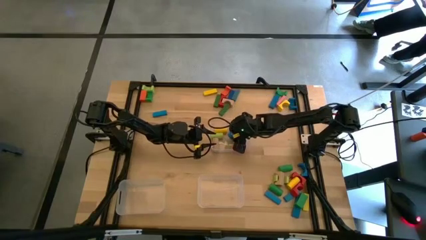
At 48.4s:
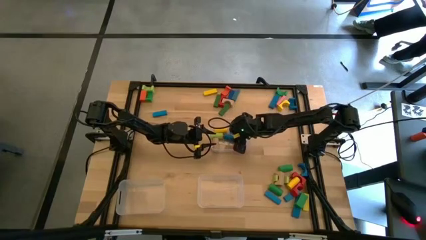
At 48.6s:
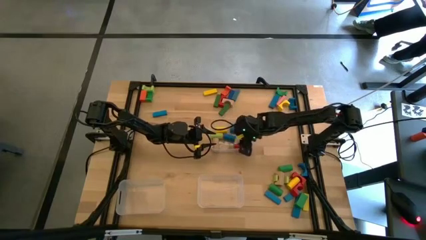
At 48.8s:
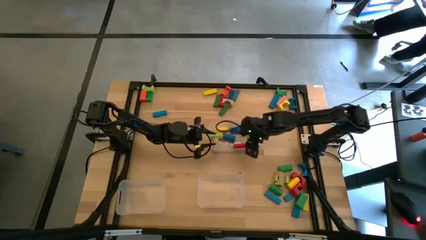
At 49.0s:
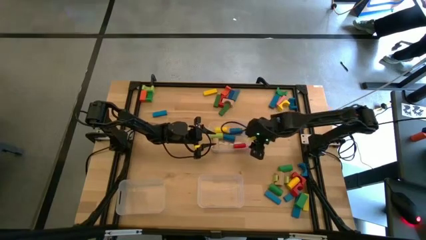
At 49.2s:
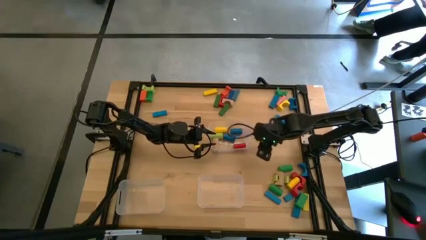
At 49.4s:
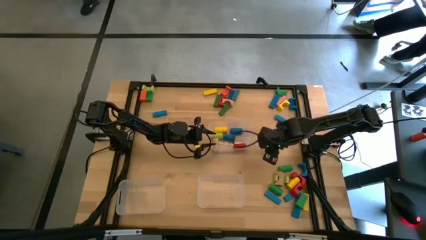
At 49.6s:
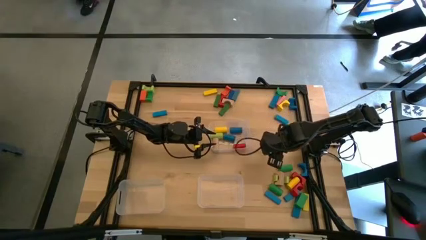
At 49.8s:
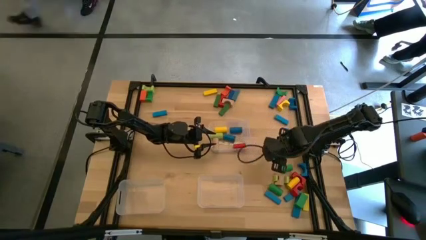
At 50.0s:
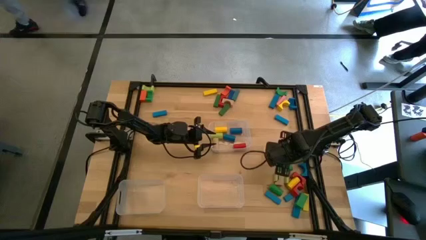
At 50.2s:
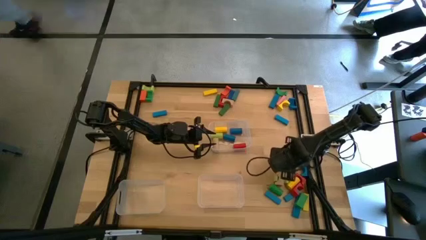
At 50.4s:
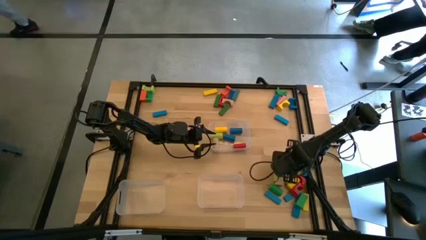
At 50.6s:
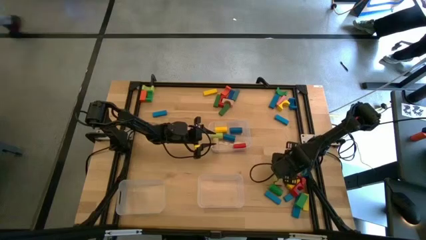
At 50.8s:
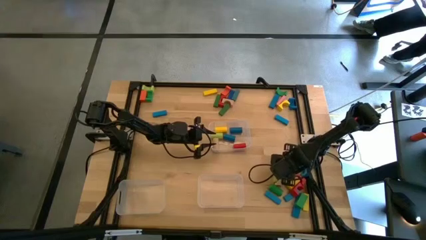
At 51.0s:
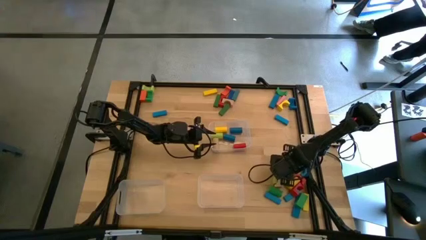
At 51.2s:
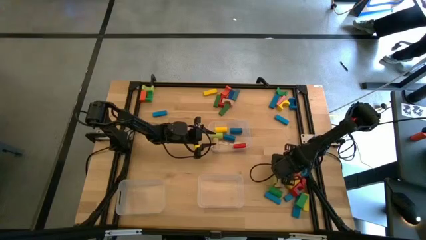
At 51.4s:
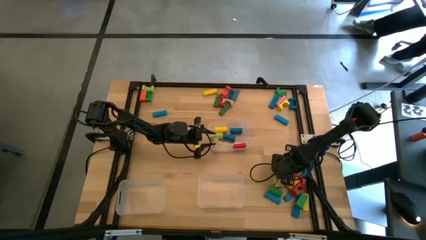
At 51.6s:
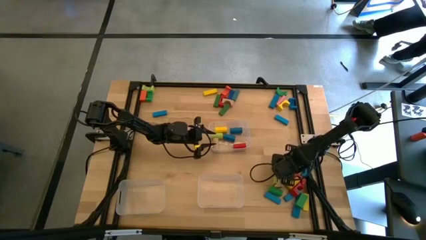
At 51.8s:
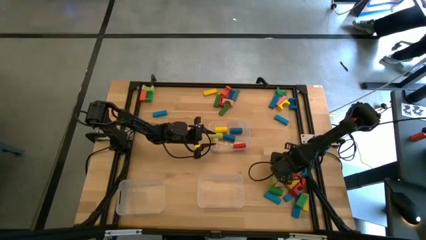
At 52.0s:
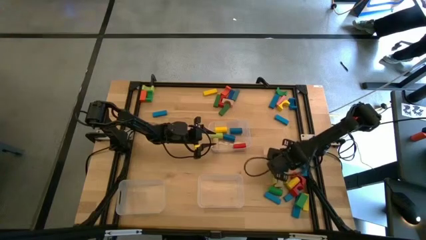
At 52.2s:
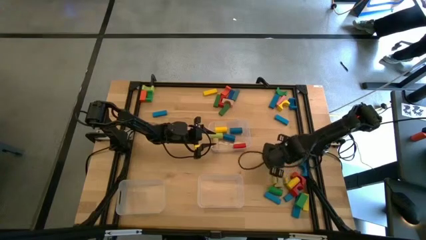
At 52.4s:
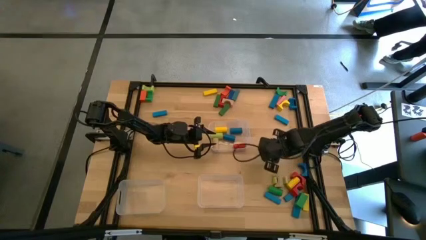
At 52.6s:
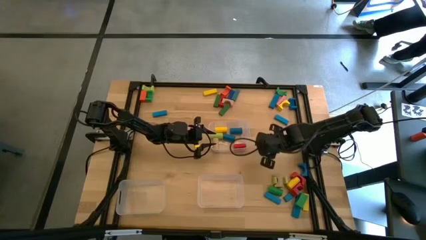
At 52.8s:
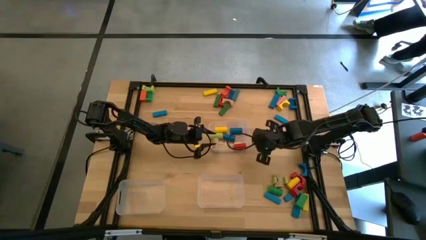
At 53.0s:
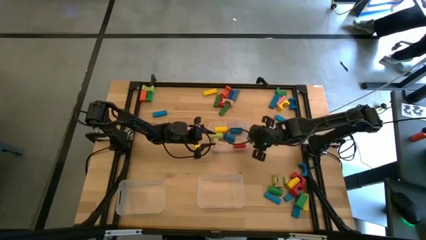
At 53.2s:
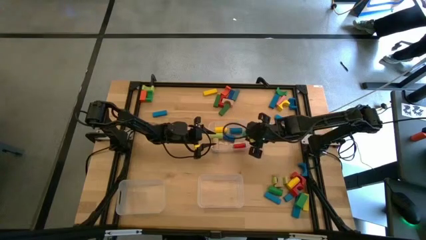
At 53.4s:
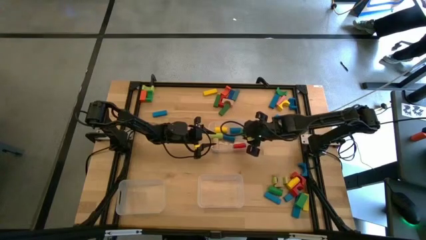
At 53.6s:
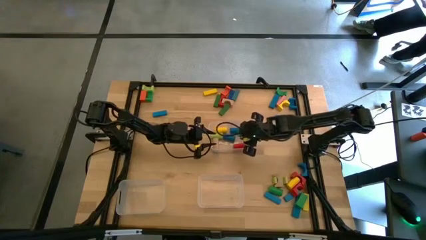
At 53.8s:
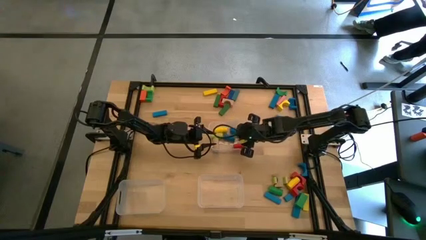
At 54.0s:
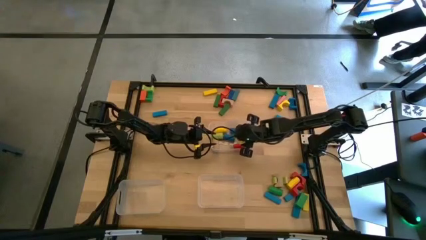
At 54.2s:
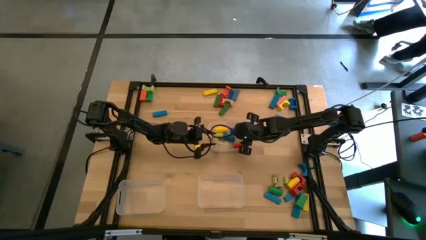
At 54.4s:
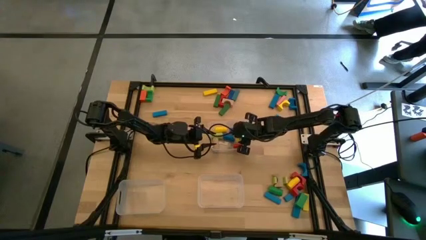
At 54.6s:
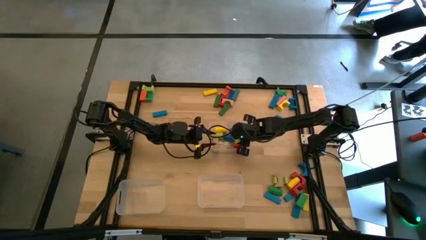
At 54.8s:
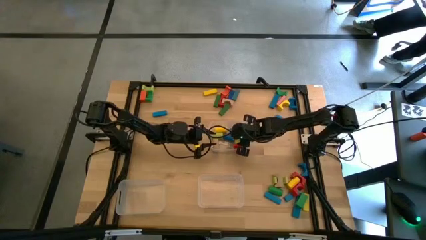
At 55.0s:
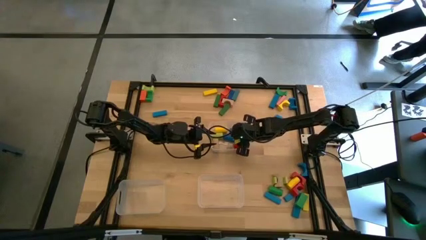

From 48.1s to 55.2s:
Task: Sort blocks by size
Put the green cylindrical block into the top transparent bin

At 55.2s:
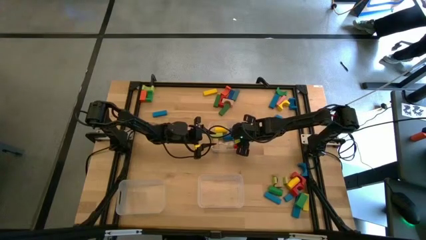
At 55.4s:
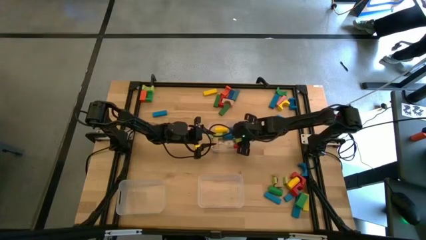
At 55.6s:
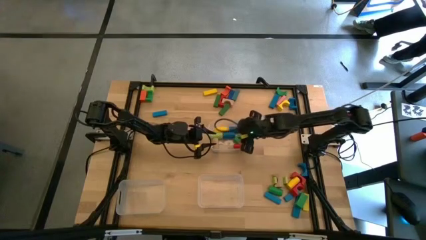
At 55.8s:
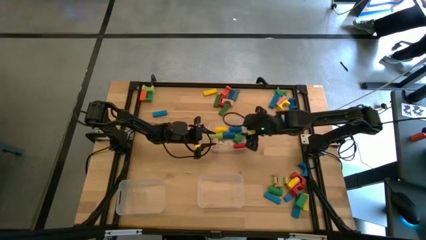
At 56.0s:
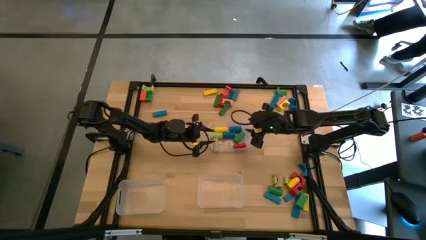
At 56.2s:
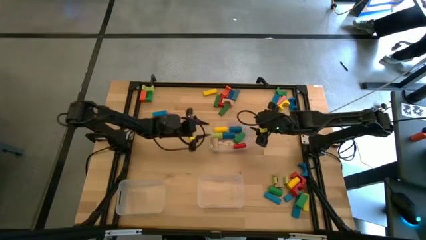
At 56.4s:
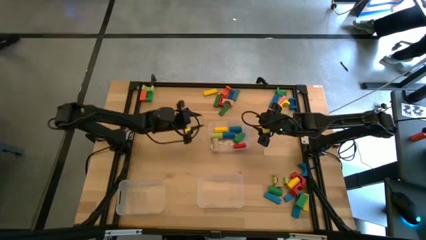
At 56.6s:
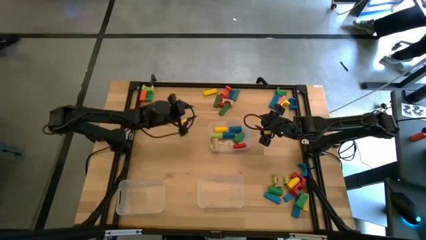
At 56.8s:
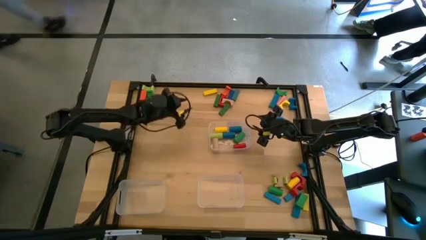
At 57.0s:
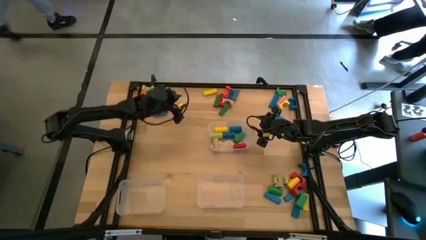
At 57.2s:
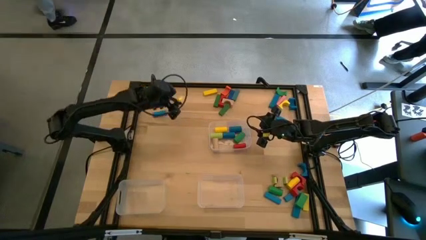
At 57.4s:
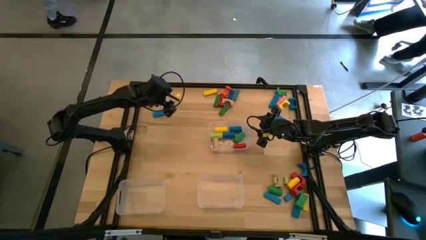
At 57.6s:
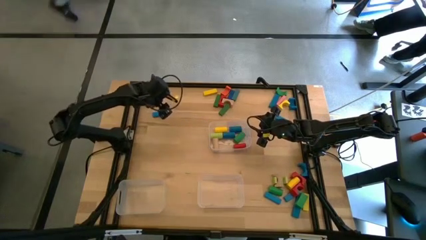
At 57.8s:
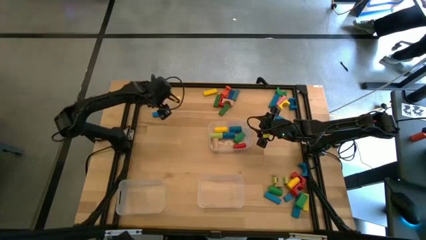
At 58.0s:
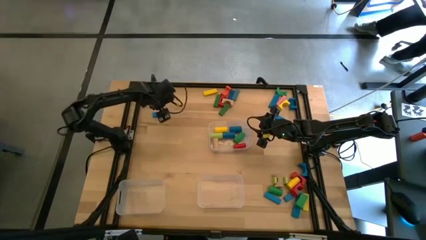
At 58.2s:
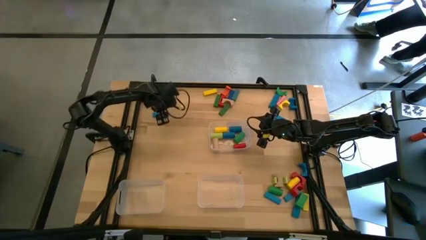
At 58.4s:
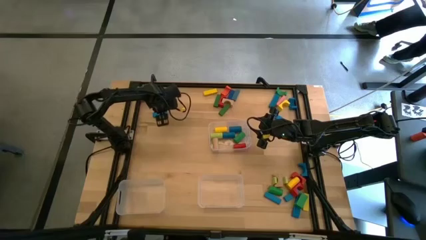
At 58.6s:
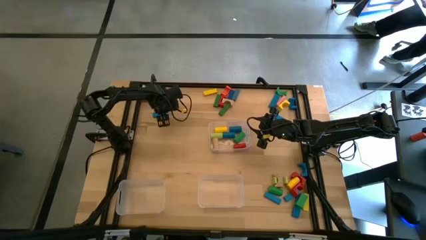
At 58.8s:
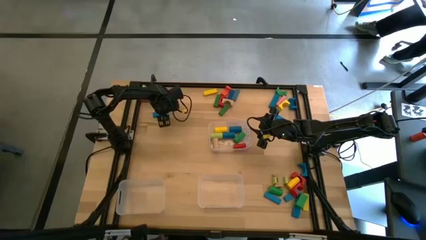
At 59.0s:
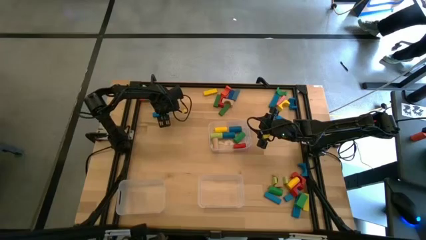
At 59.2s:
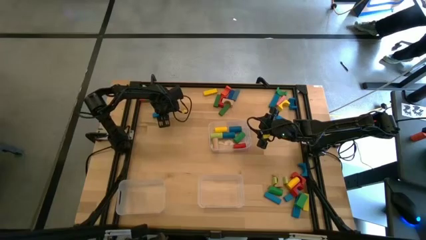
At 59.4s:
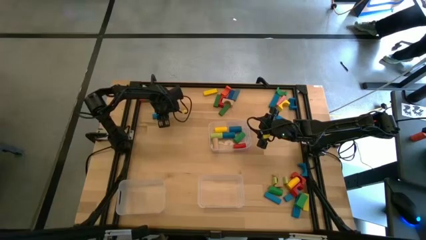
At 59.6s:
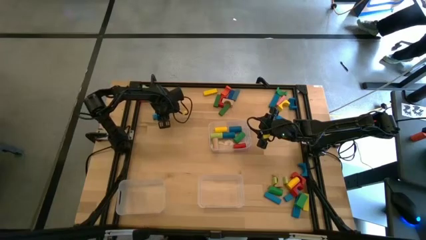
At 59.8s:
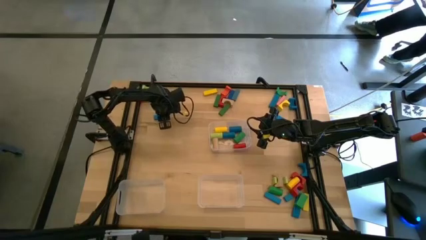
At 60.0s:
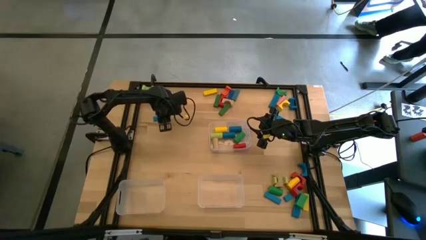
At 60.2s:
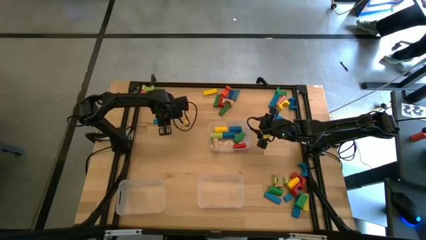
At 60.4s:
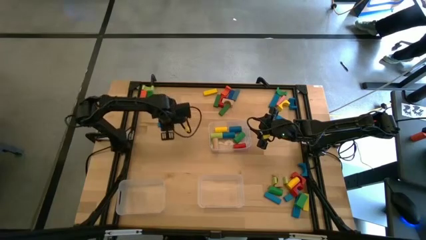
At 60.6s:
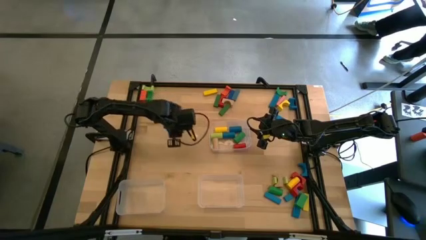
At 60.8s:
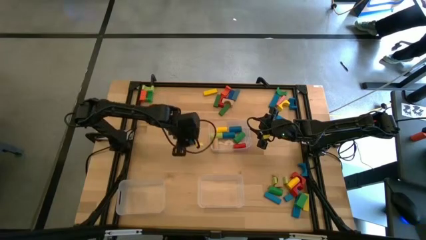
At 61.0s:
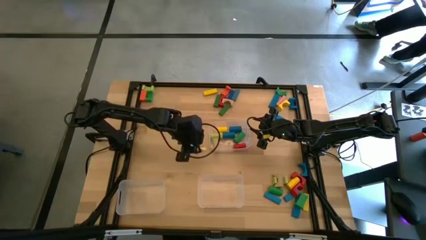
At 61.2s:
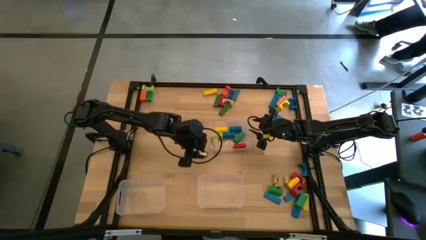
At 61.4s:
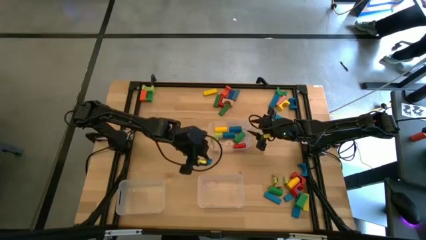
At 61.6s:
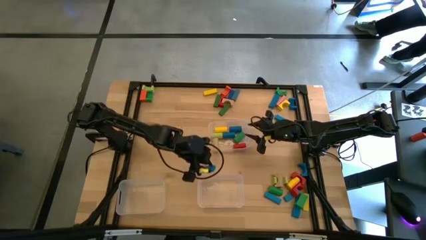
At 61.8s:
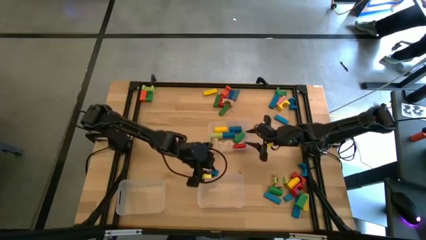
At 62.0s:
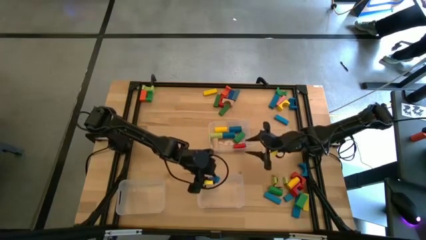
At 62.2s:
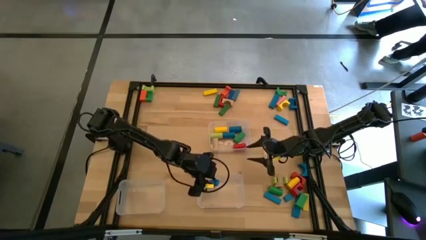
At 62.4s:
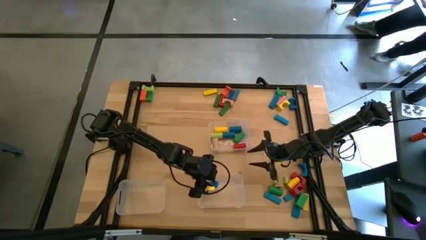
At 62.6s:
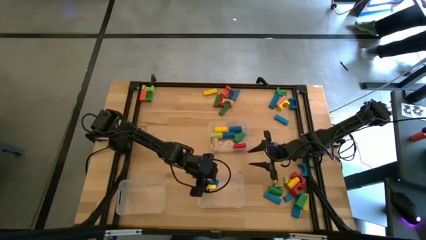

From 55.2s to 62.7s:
Put the blue rectangular block into the bottom right transparent bin

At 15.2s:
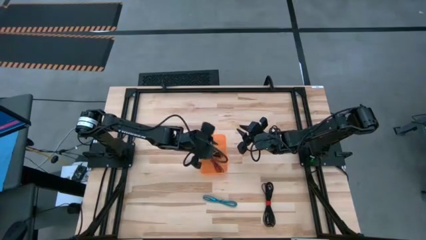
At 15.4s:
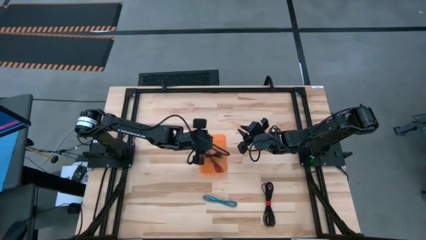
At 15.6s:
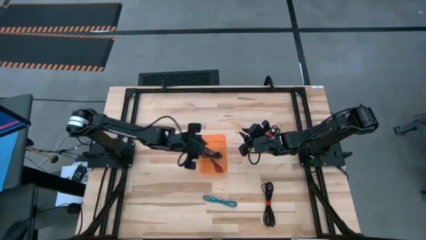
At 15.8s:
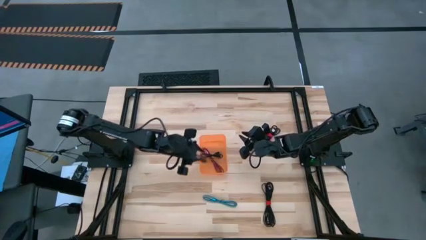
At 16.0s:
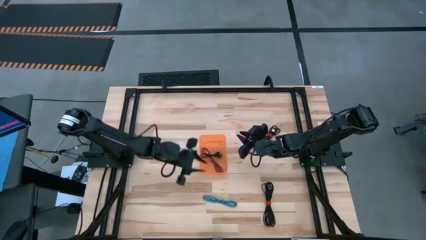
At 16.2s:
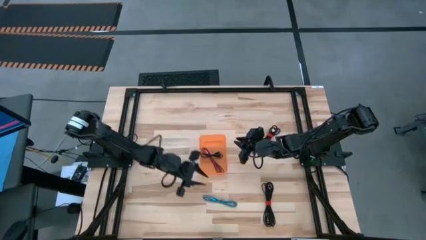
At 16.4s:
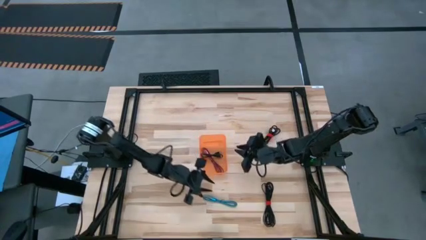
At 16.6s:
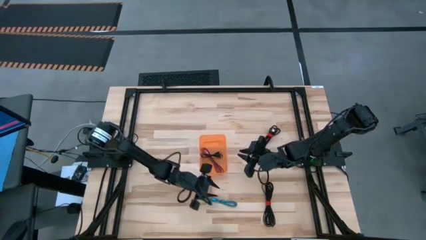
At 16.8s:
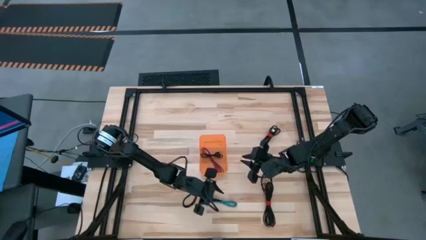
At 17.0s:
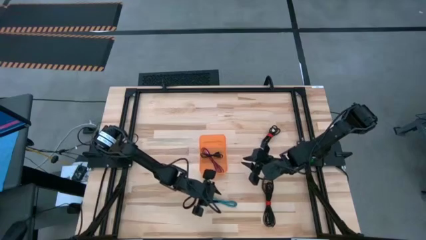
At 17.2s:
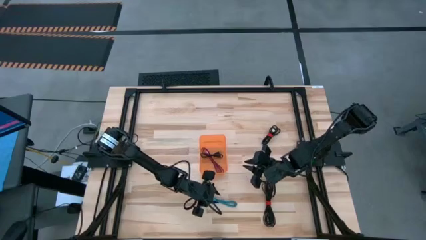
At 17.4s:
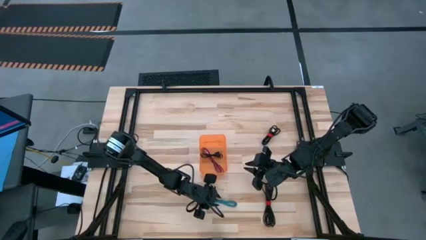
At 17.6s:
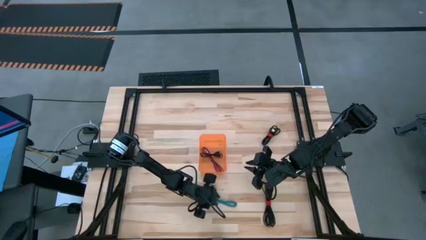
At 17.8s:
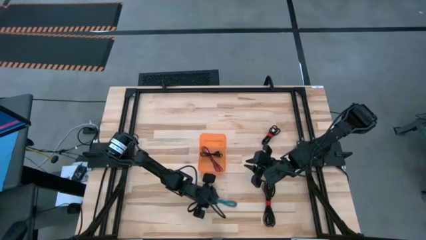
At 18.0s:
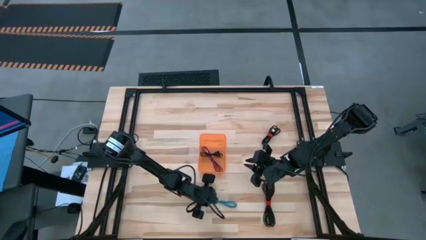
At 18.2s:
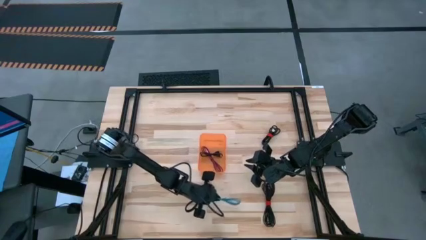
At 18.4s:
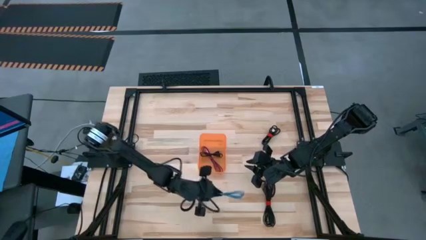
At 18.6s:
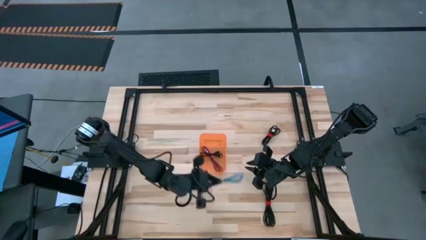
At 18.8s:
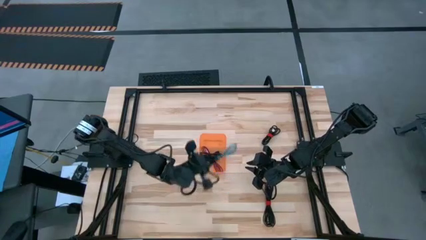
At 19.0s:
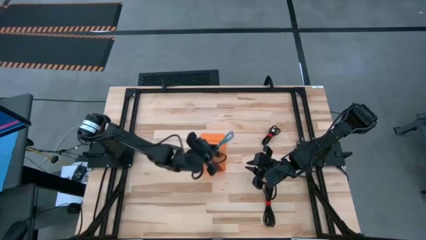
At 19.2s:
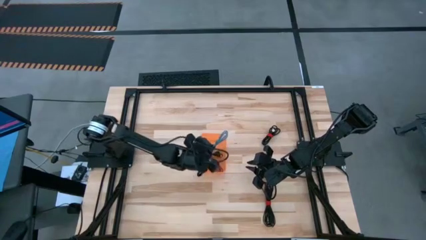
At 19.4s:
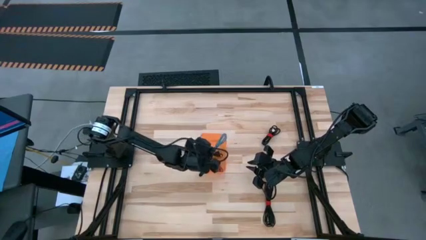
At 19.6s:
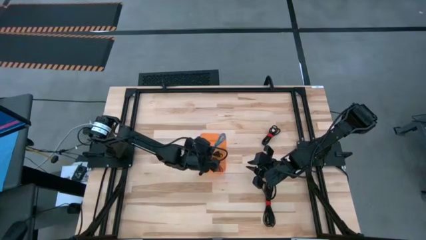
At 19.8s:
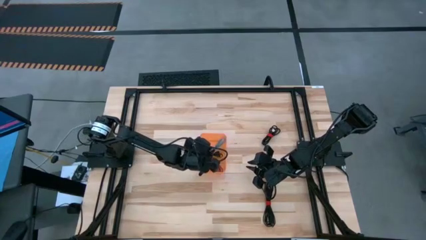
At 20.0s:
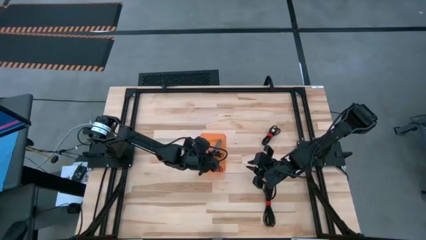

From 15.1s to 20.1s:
Task: Pick and place USB-C Cables
Put the blue charger cable into the orange bin
